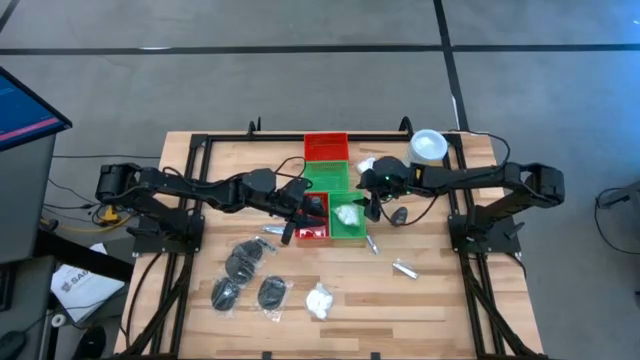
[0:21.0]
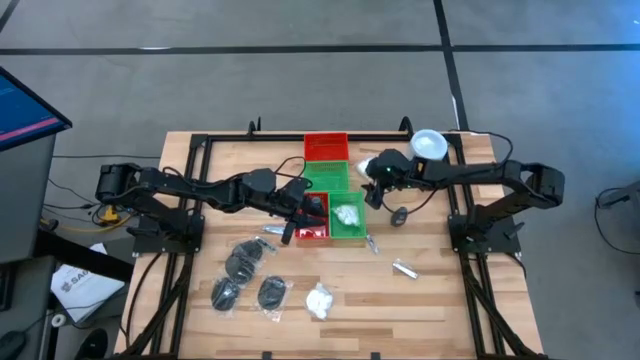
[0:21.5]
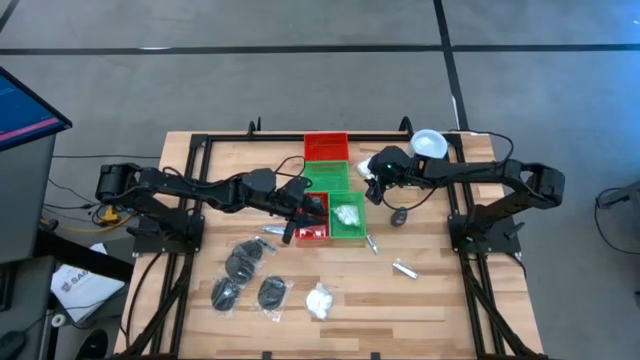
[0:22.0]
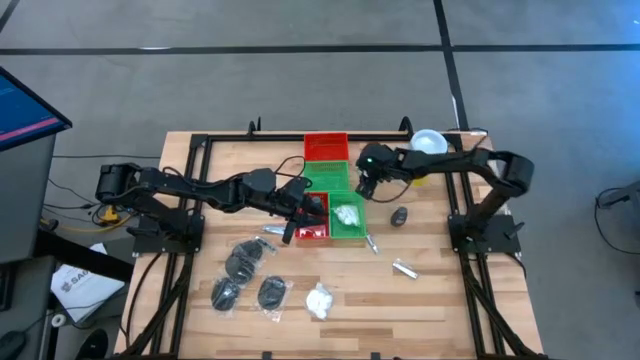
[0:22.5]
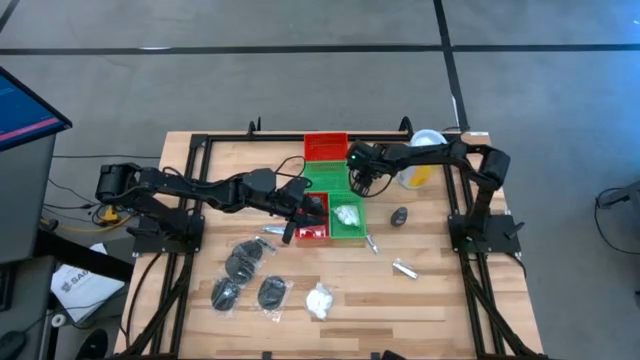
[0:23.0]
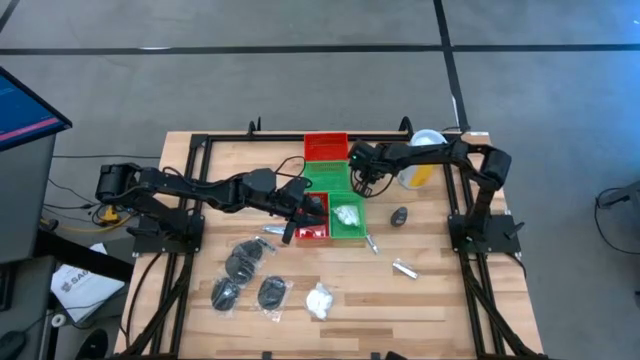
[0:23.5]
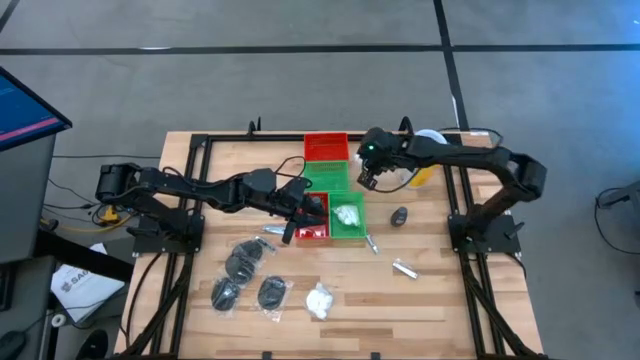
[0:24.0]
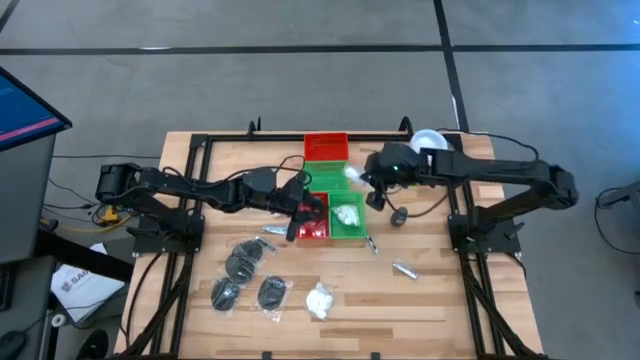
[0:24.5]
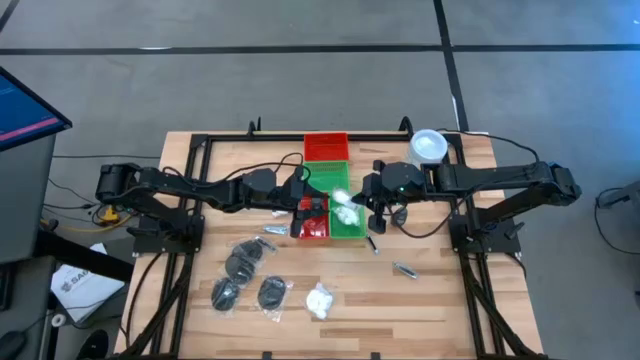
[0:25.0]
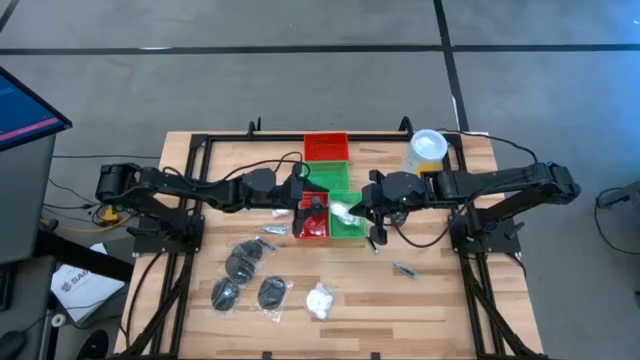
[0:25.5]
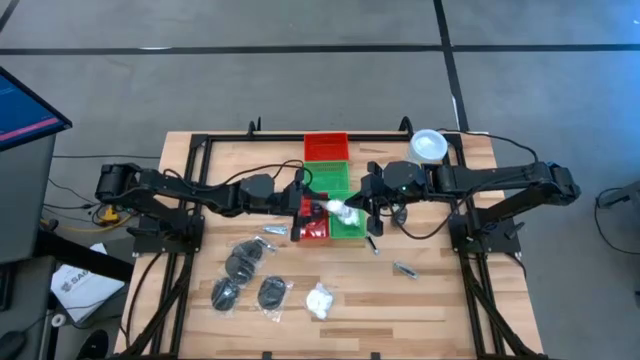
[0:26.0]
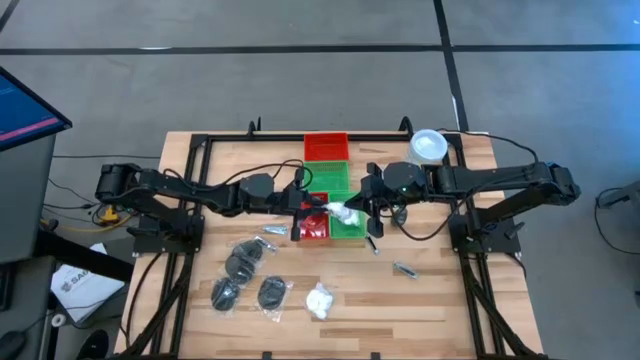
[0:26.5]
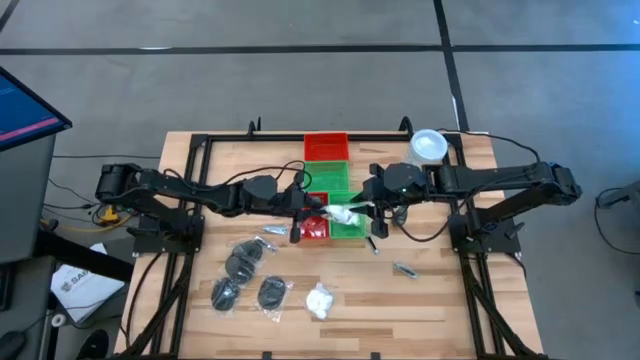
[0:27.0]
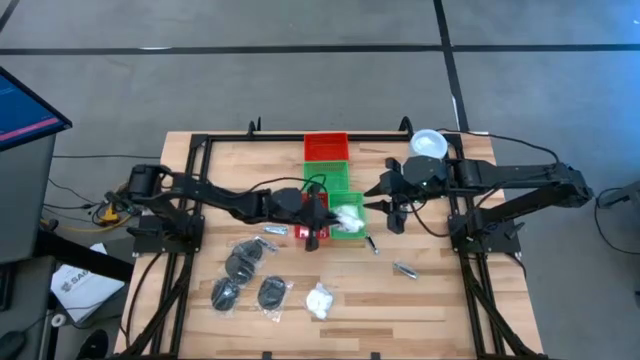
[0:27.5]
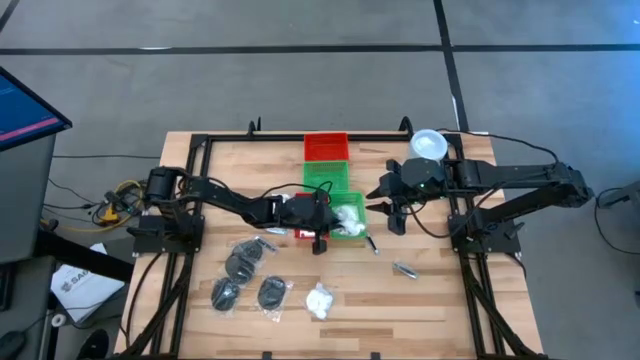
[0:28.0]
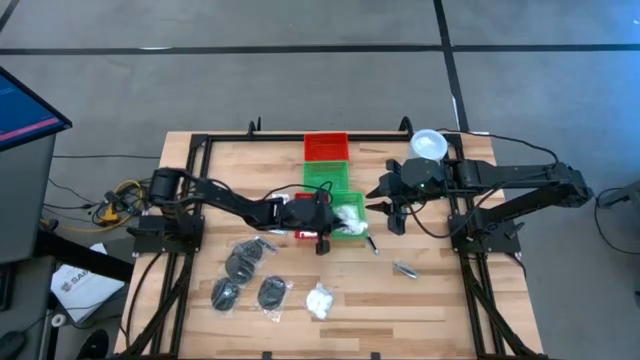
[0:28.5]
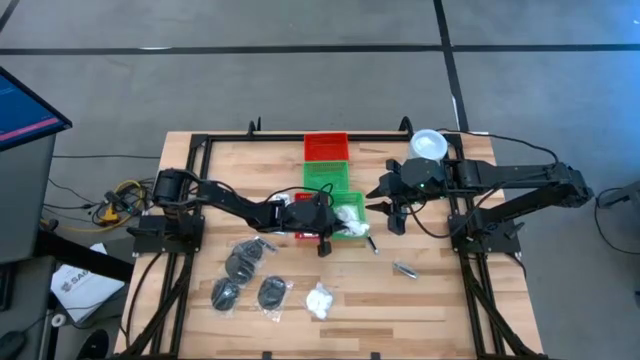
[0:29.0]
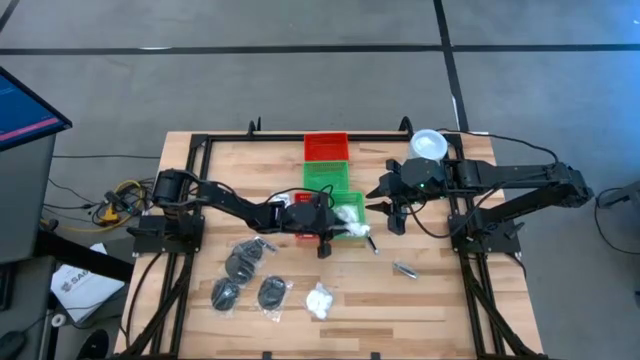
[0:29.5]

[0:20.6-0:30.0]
Task: Pick & Place Travel size toiletries
Put the white cotton pack into the bottom green bin

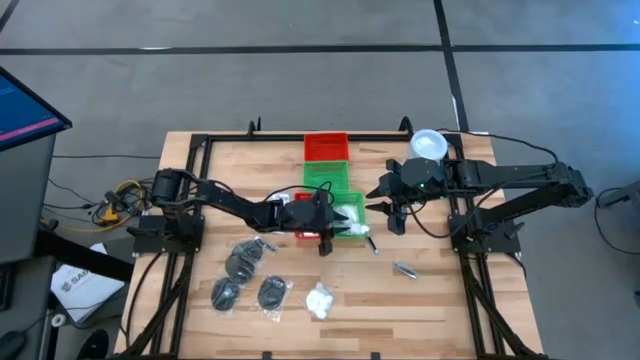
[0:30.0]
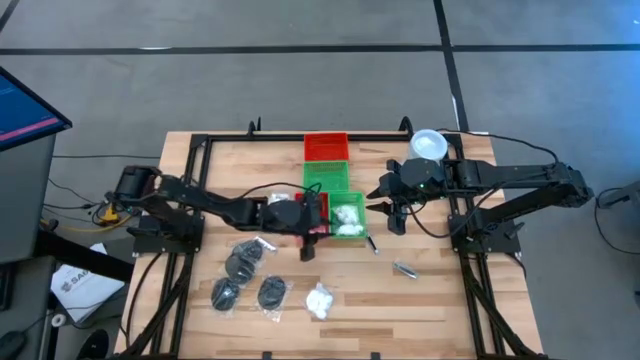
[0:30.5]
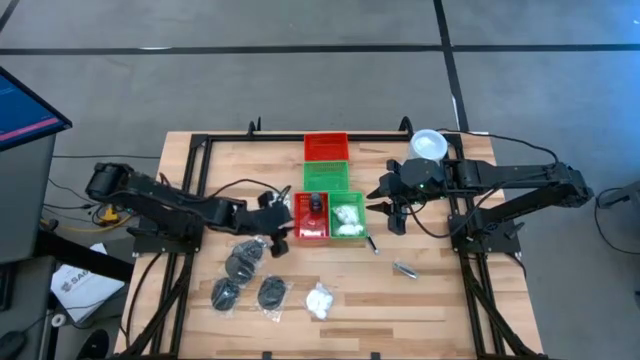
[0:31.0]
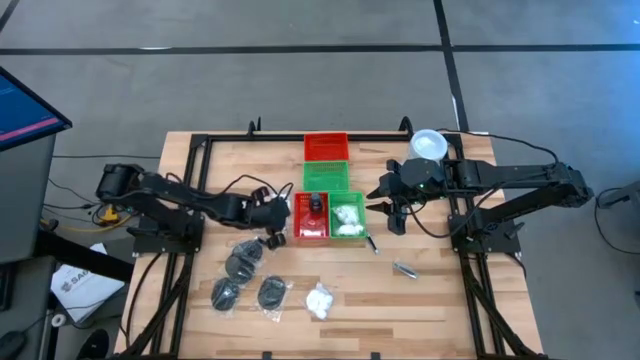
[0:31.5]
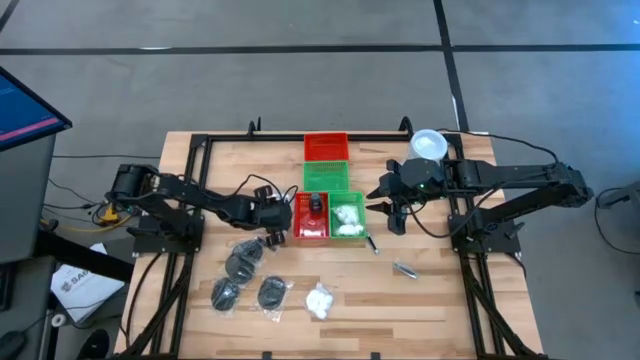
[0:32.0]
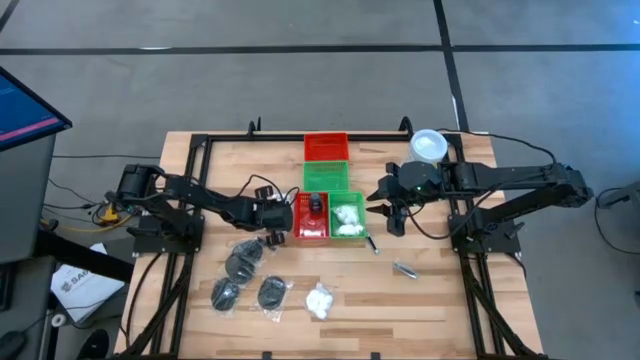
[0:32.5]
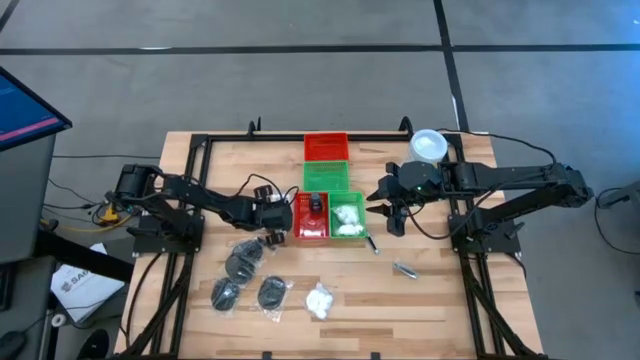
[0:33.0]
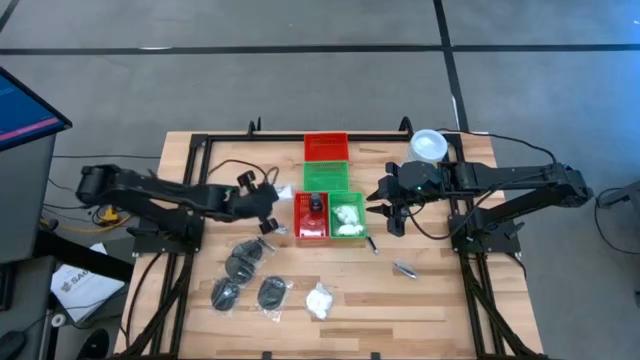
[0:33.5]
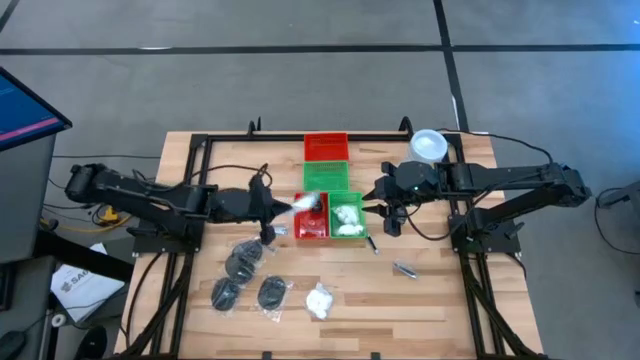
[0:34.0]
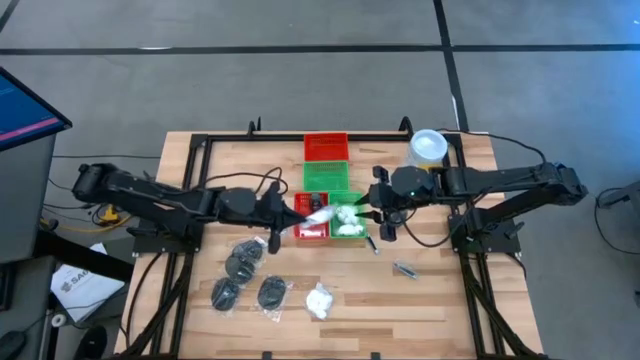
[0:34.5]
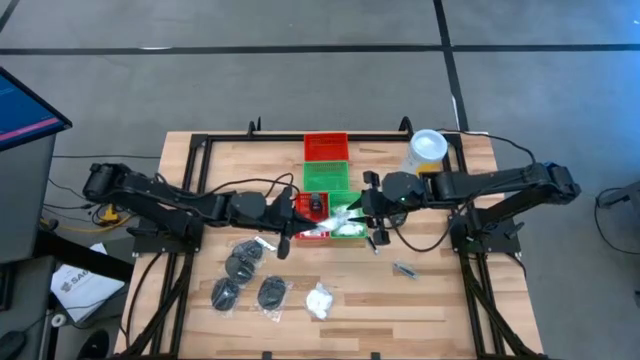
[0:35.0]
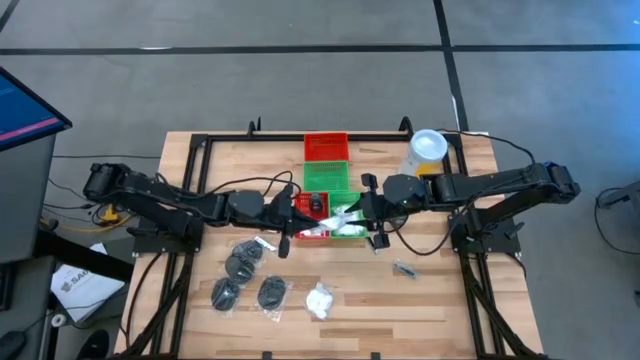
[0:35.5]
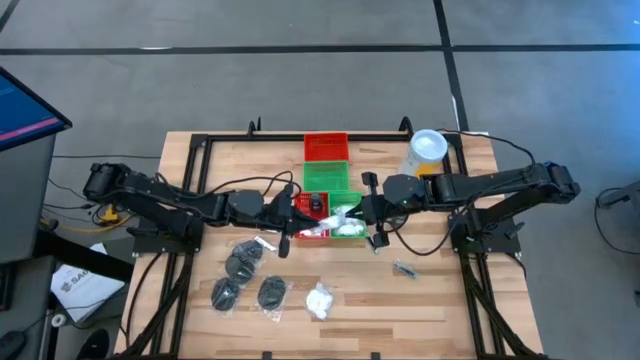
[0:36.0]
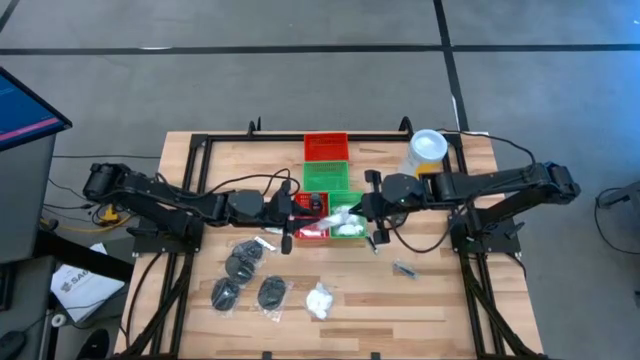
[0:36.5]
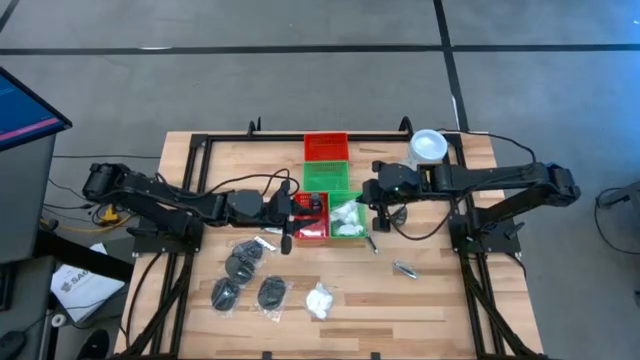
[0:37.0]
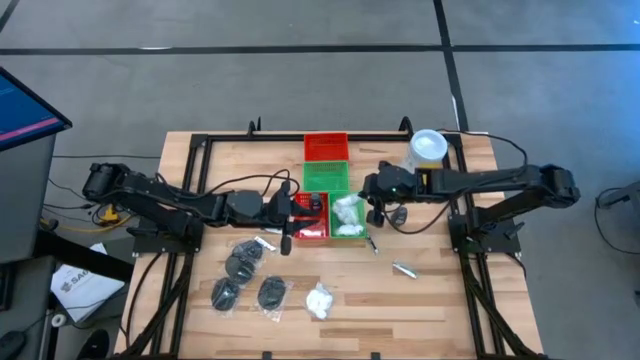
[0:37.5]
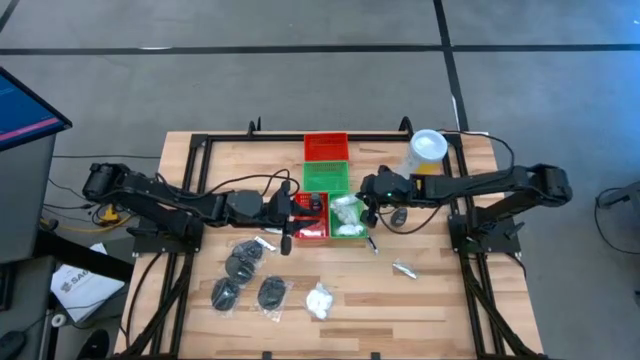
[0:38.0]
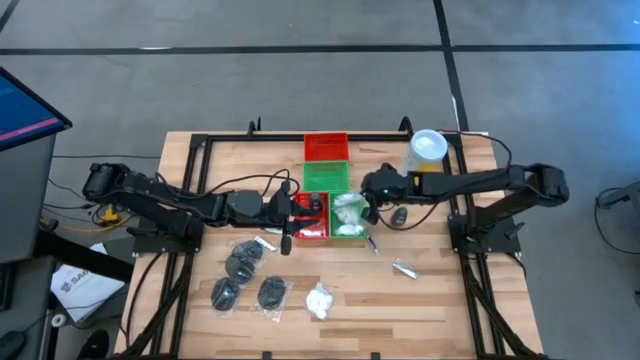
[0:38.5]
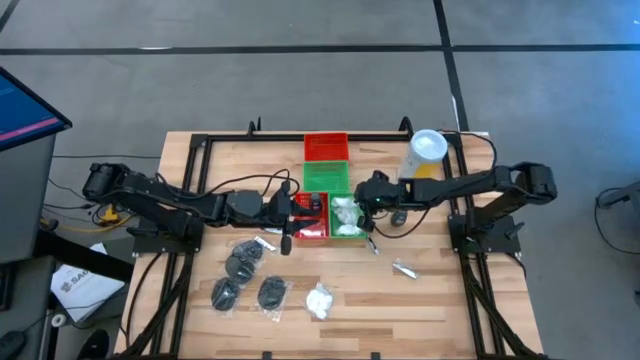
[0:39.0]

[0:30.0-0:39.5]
Put the white cotton pack into the bottom green bin

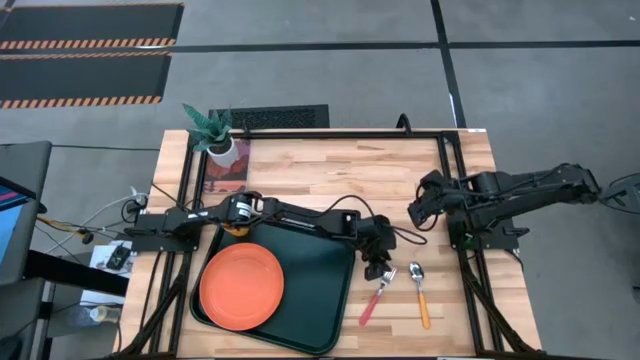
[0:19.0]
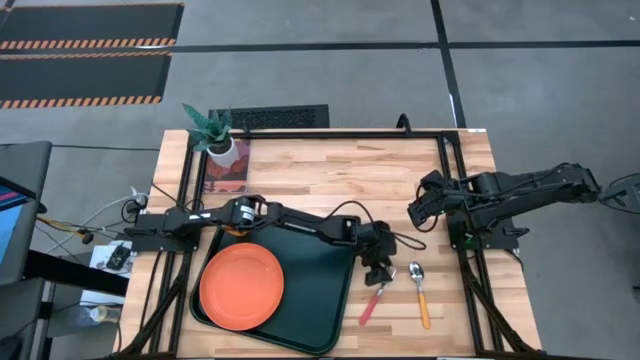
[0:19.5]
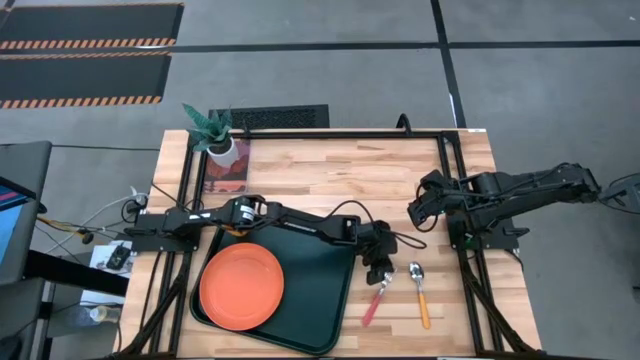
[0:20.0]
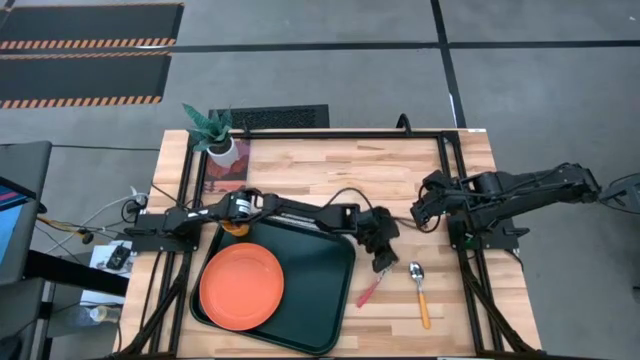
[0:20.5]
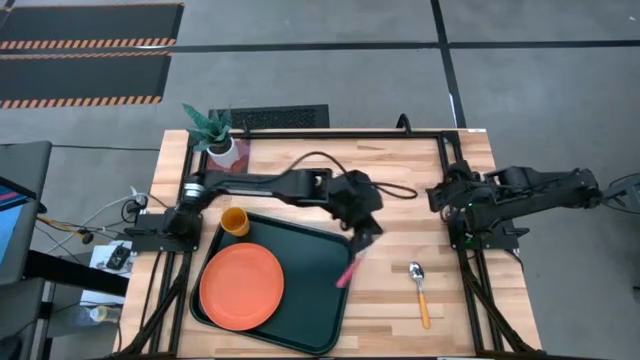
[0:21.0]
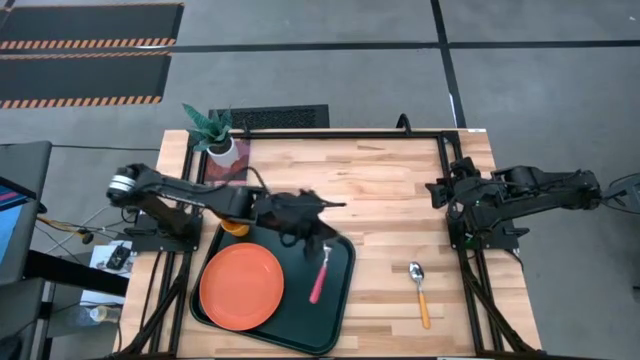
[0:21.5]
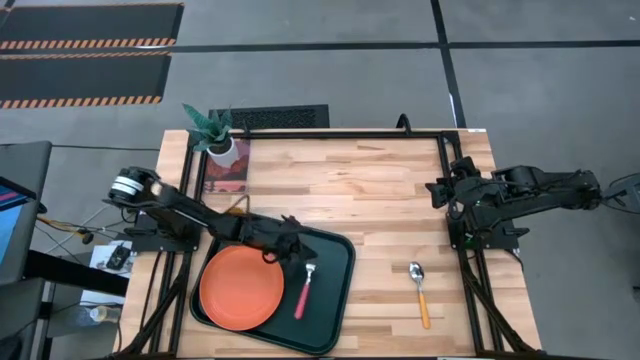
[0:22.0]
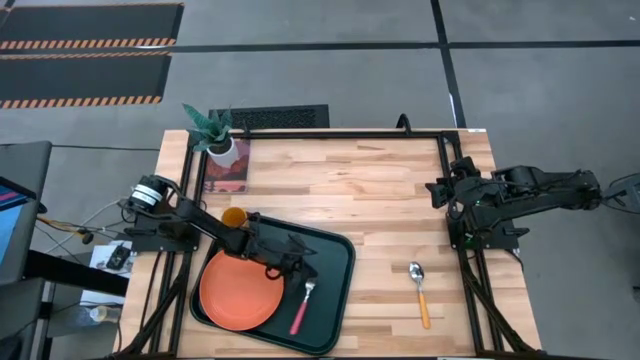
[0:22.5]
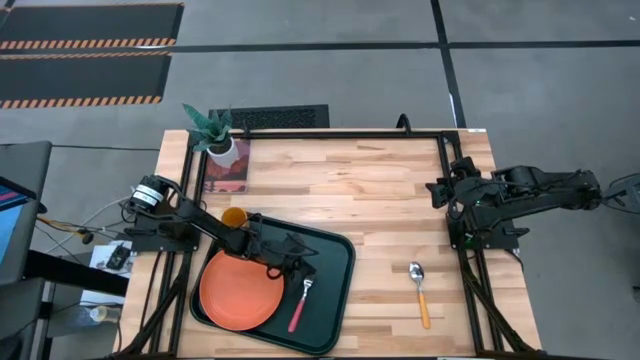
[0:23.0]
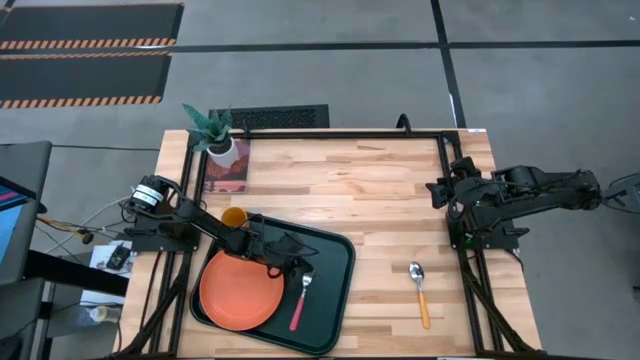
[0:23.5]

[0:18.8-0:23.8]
Task: Pick and place plate/cup/fork/spoon on tray
Put the pink fork on the right of the black tray
